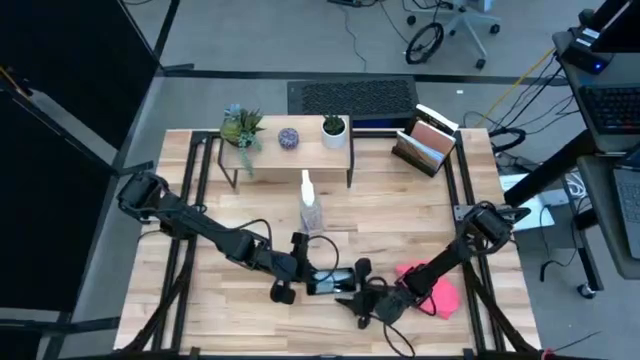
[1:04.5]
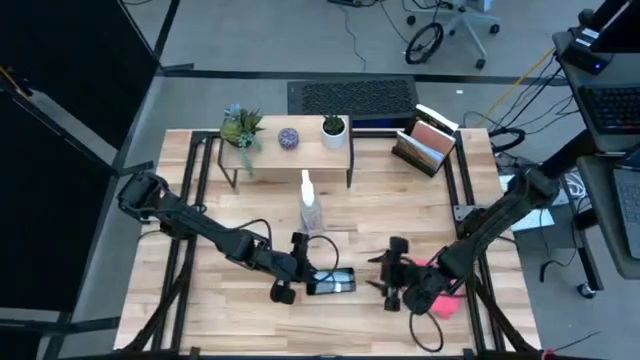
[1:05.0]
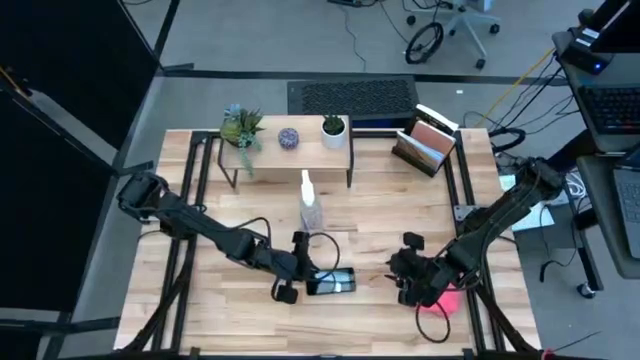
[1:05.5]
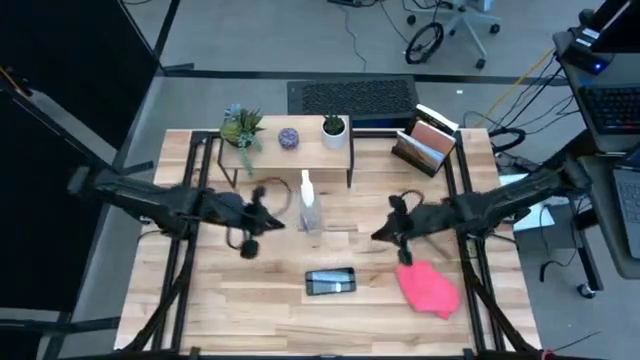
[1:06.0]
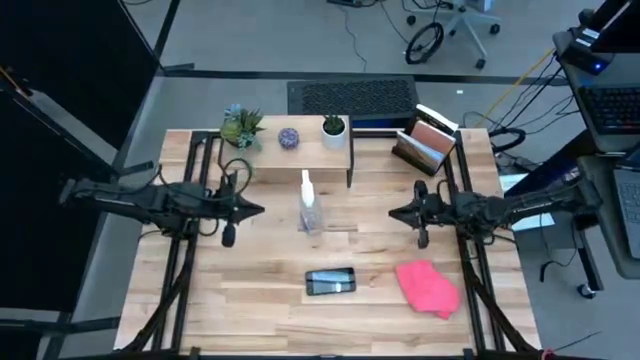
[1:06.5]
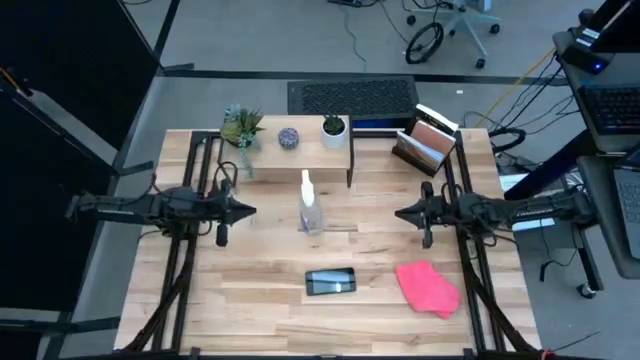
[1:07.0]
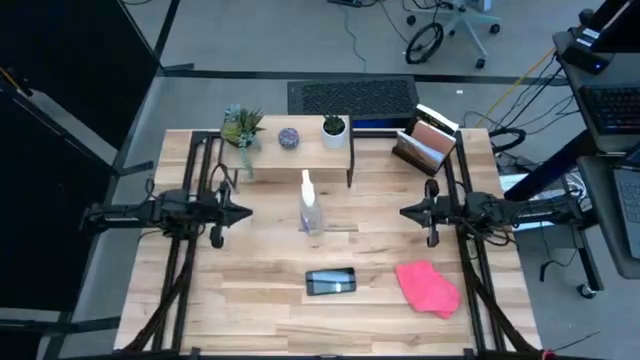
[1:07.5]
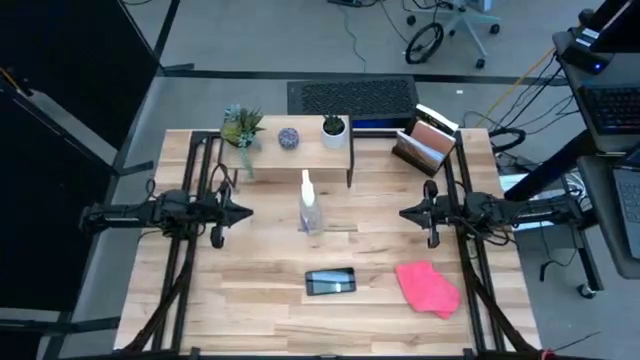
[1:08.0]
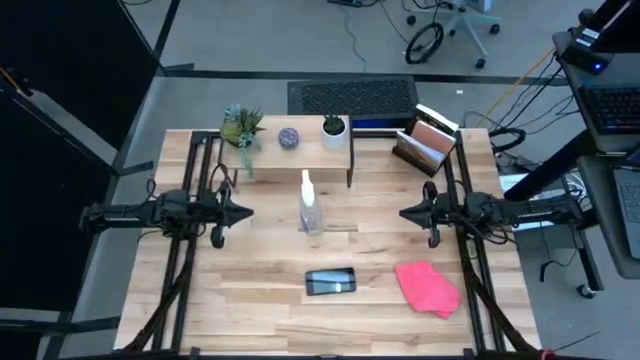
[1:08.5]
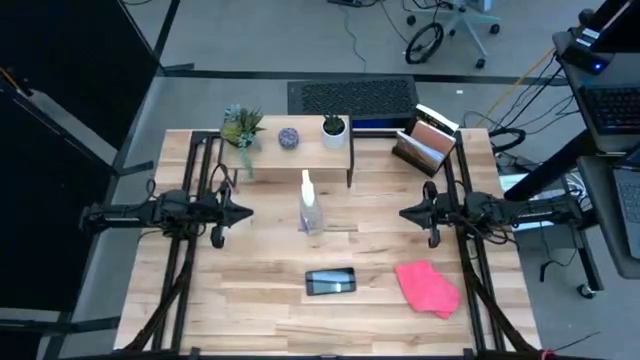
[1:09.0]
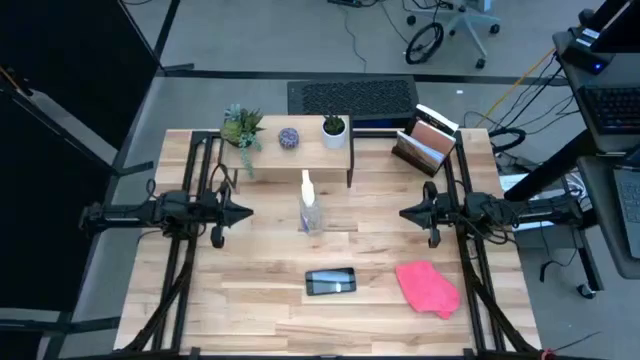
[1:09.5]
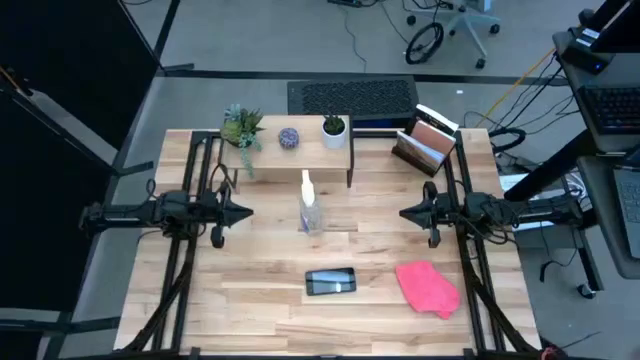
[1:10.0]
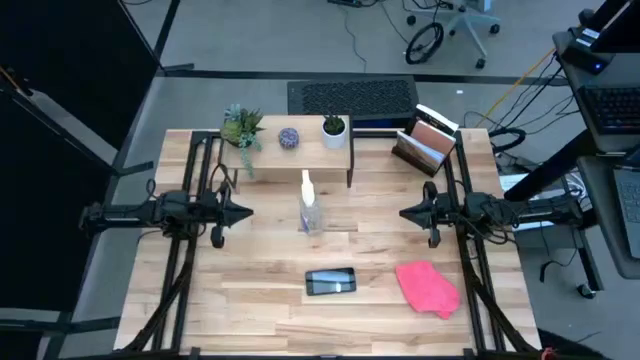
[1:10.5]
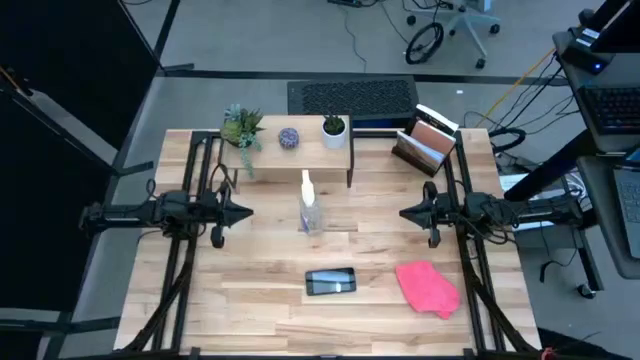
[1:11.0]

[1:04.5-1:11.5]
Task: Apply microfiber cloth
Return to Home Position

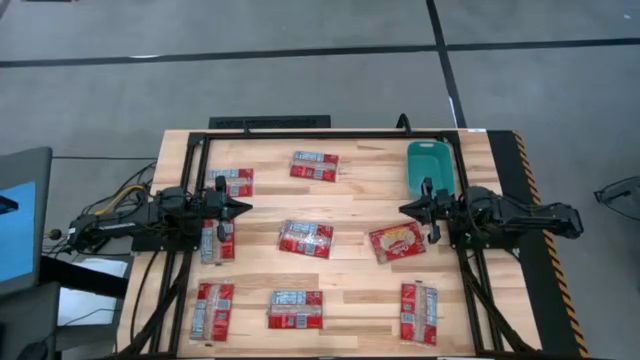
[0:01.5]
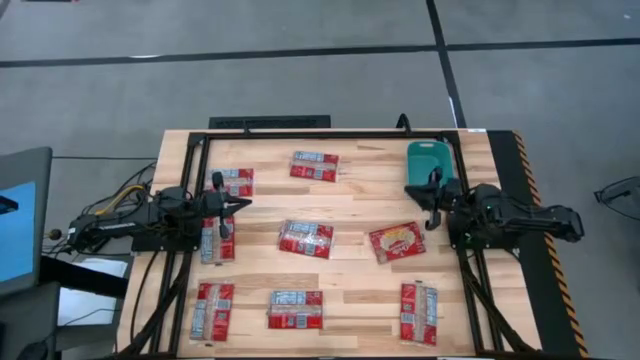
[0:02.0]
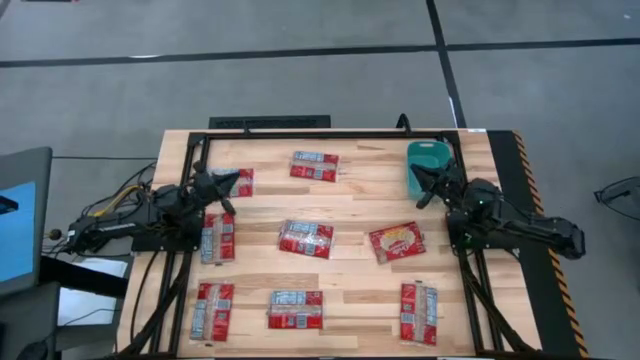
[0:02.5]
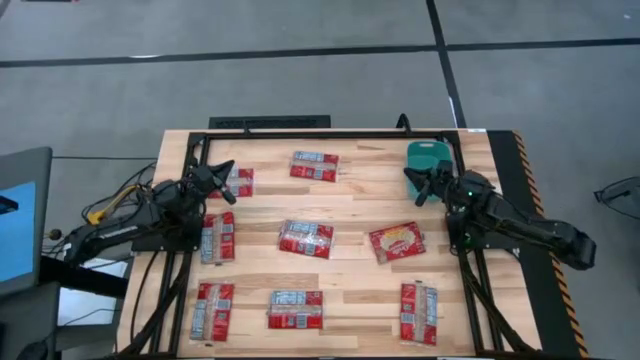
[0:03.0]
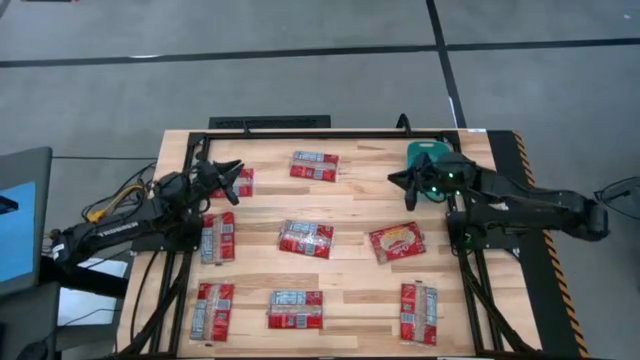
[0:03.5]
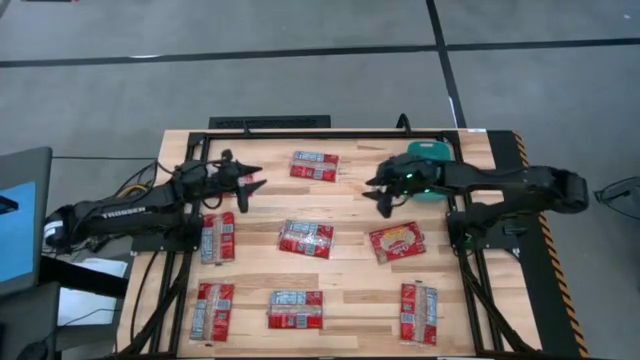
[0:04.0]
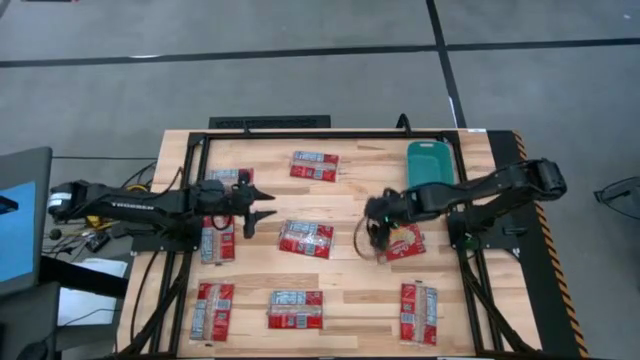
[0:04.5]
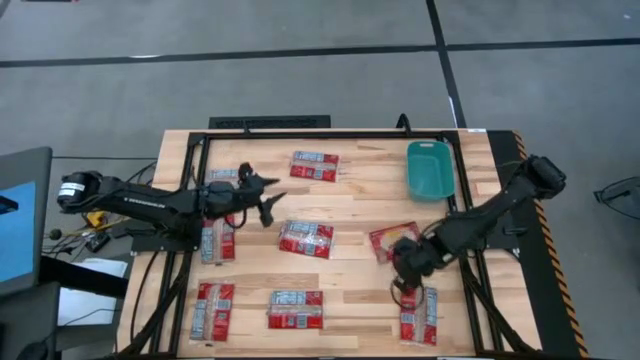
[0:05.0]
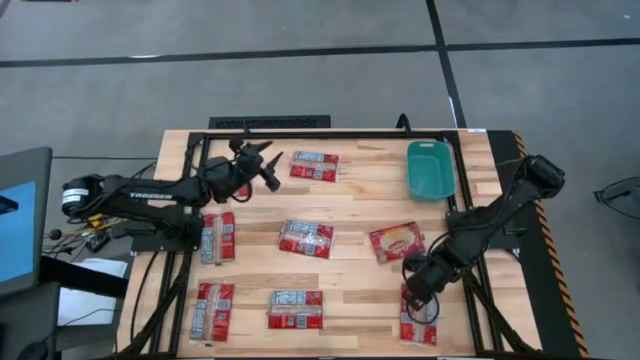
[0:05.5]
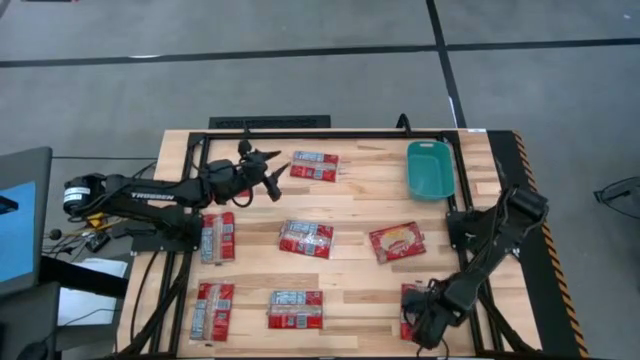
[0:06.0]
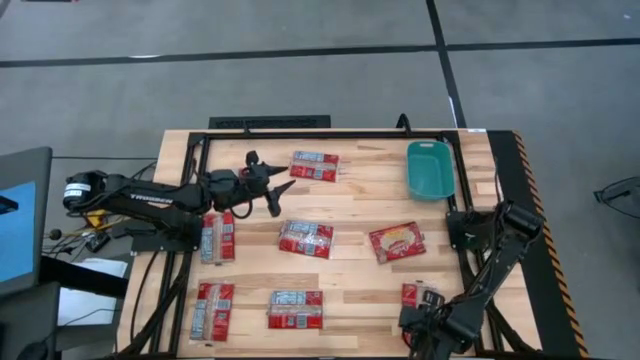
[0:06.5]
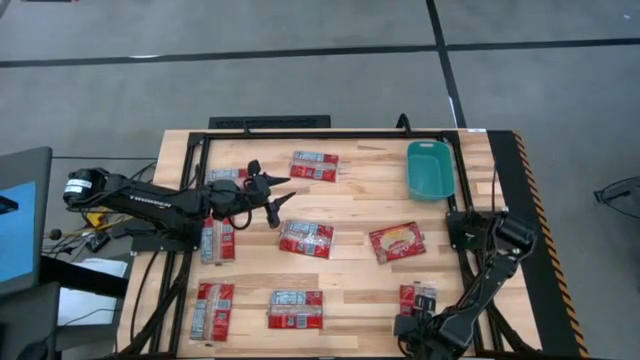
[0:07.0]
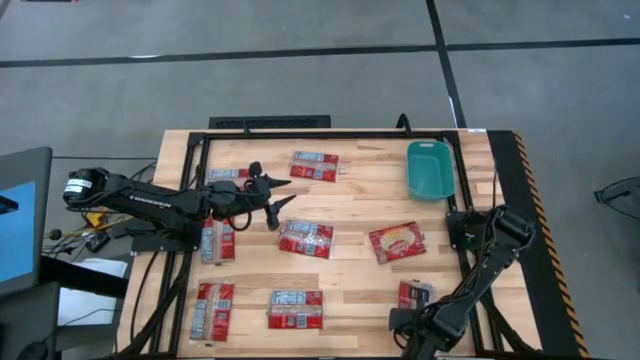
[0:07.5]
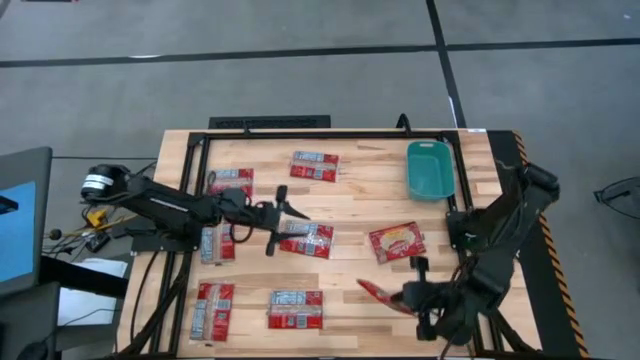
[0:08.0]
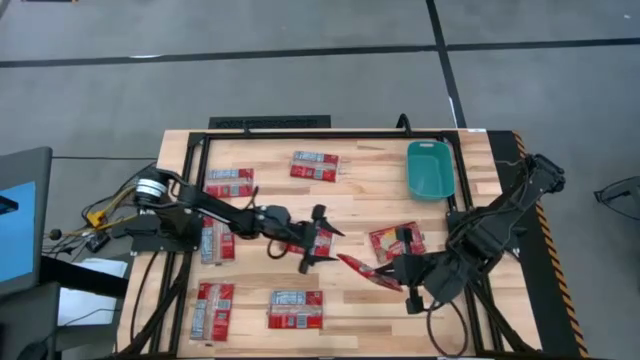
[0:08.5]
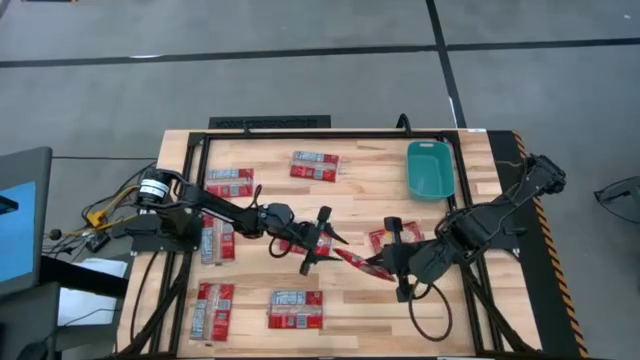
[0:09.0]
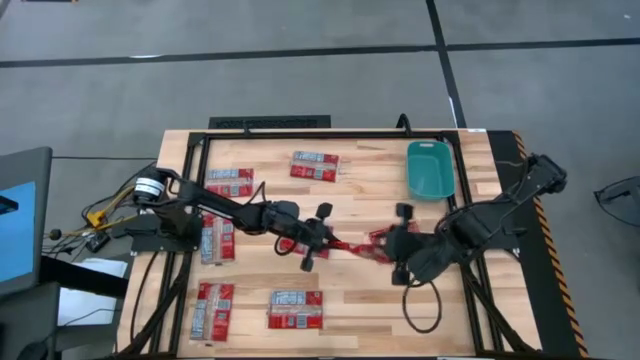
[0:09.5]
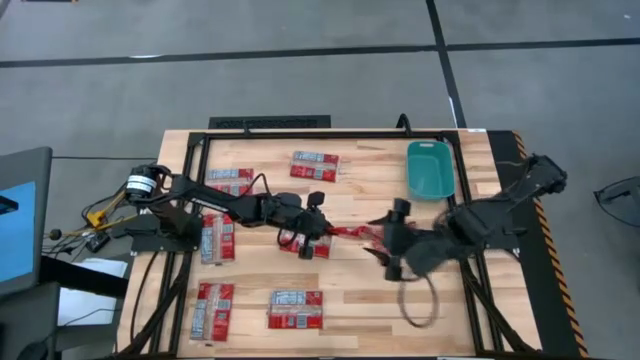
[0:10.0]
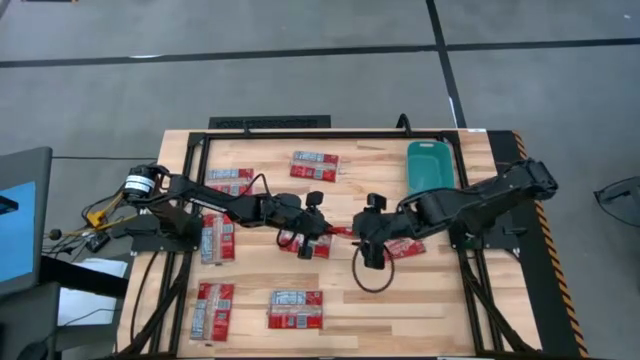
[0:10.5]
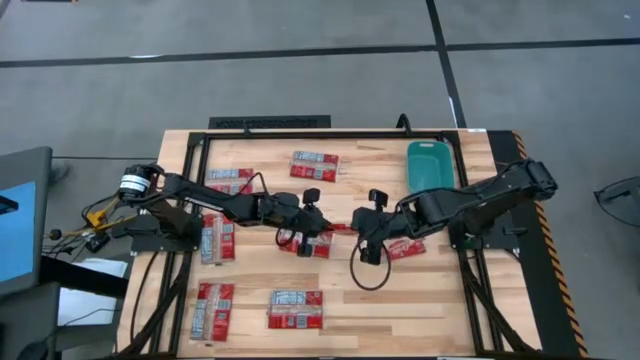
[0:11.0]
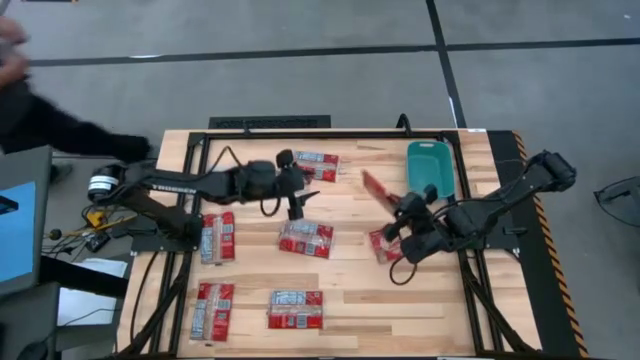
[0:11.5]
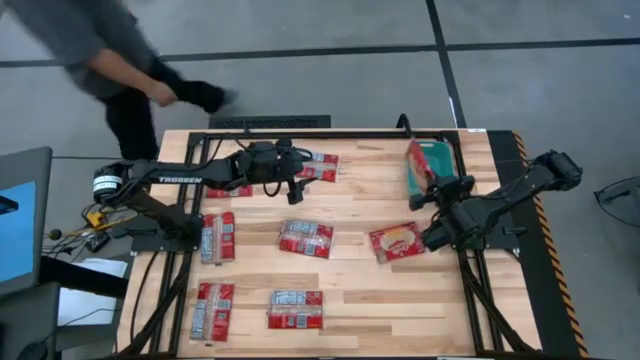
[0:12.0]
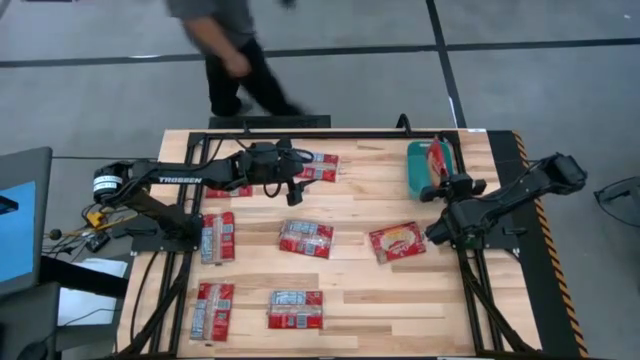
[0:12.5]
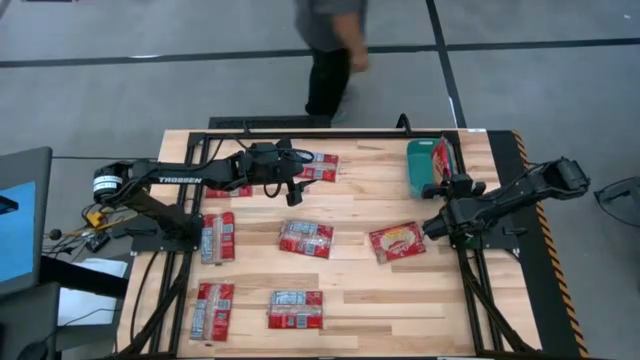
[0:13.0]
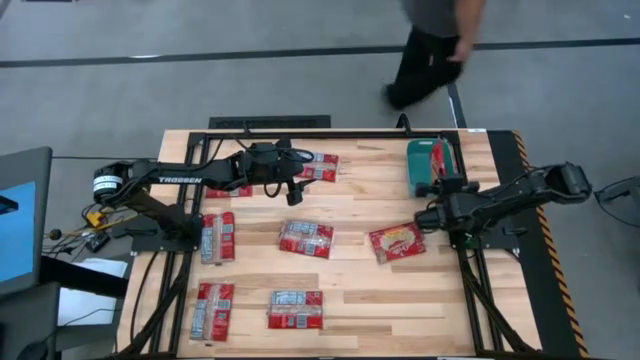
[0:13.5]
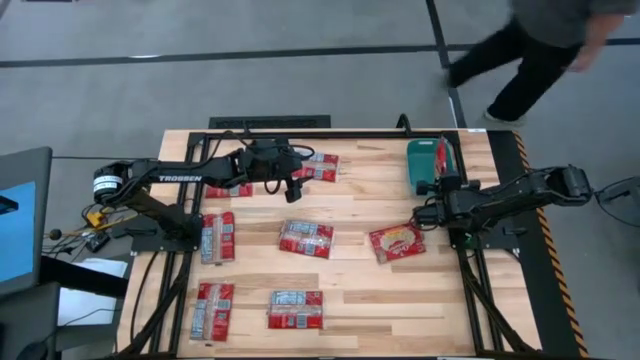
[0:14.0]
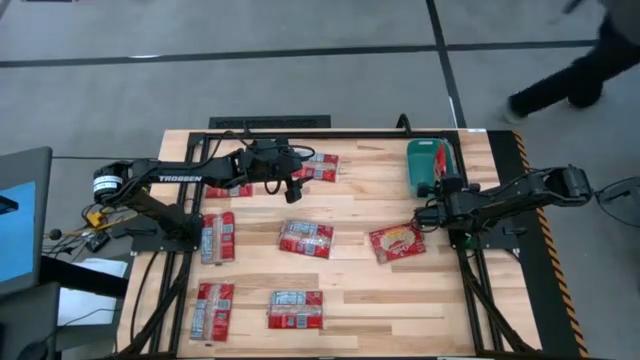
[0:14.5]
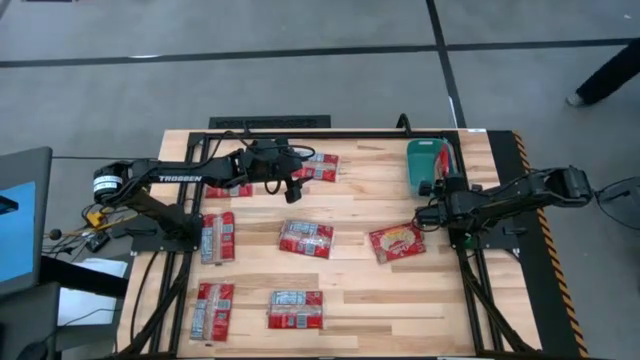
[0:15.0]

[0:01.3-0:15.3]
Task: Sort popcorn bags into baskets
Put the popcorn bag into the green bin

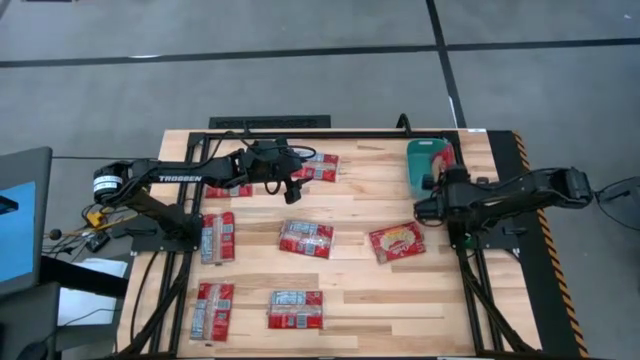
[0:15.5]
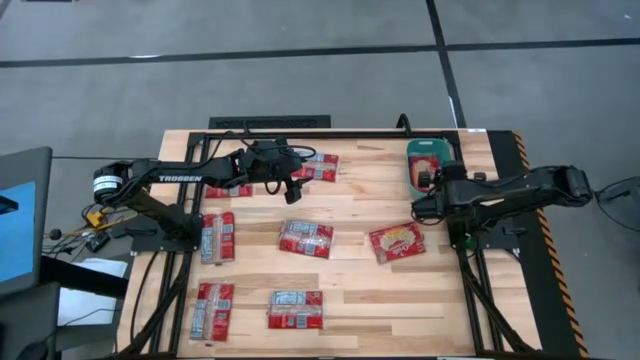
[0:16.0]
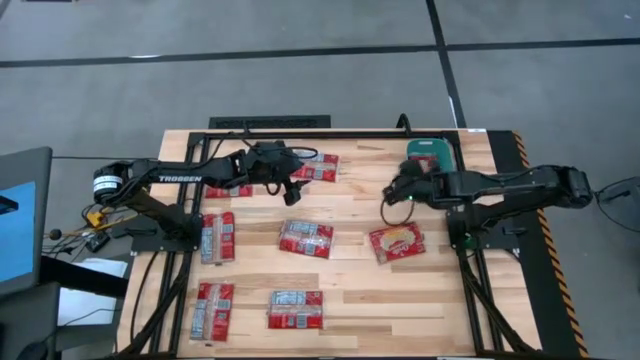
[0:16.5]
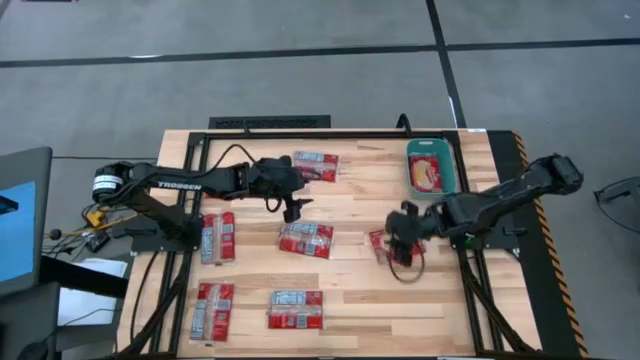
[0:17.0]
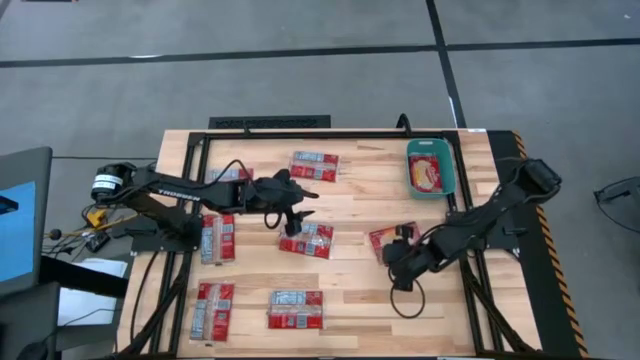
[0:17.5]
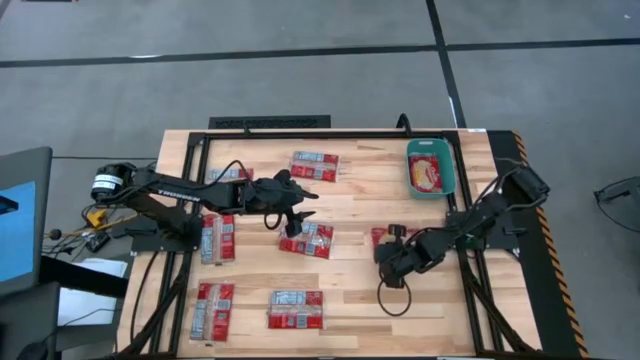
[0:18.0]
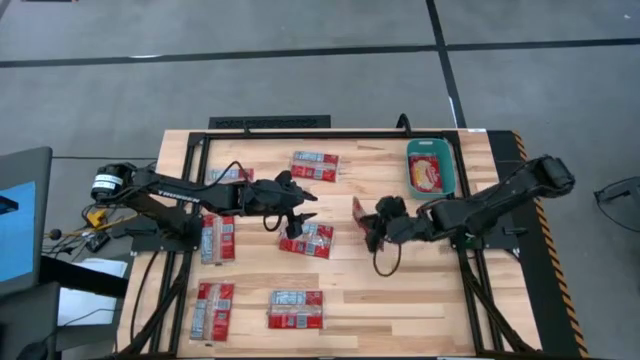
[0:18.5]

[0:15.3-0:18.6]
Put the popcorn bag into the green bin
